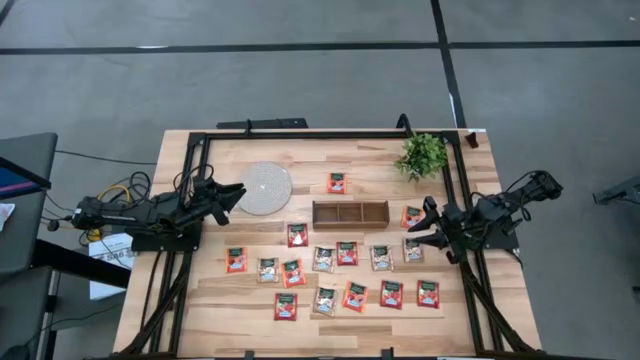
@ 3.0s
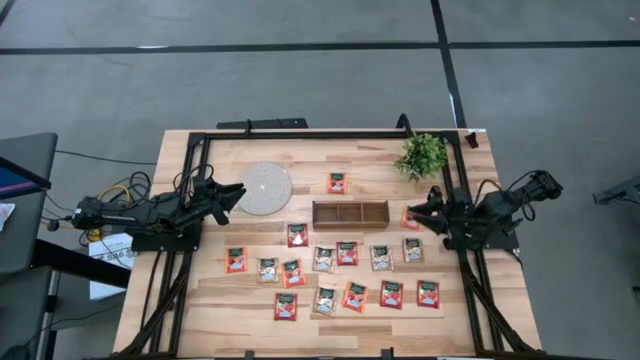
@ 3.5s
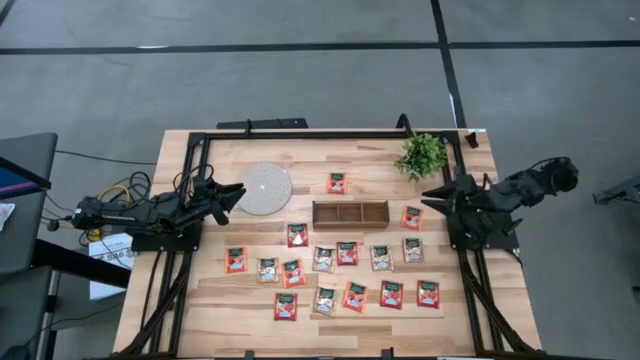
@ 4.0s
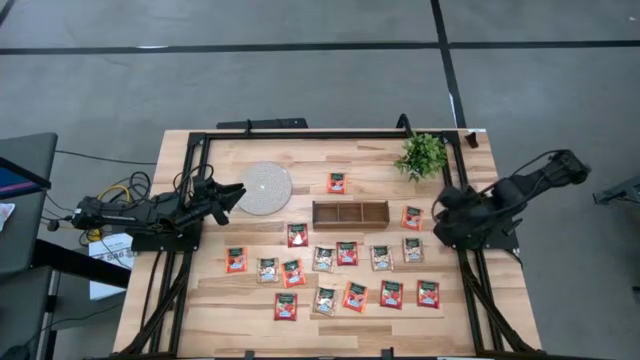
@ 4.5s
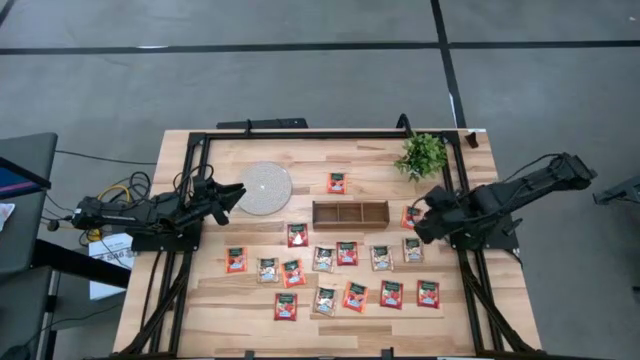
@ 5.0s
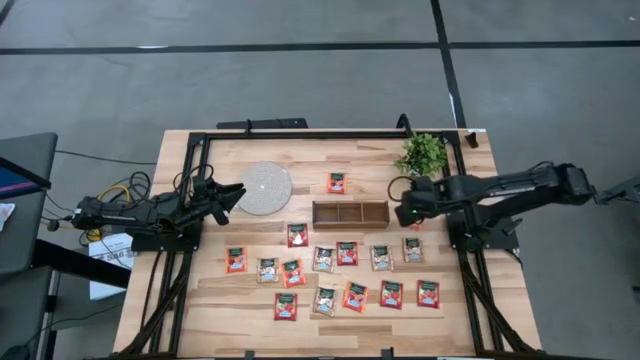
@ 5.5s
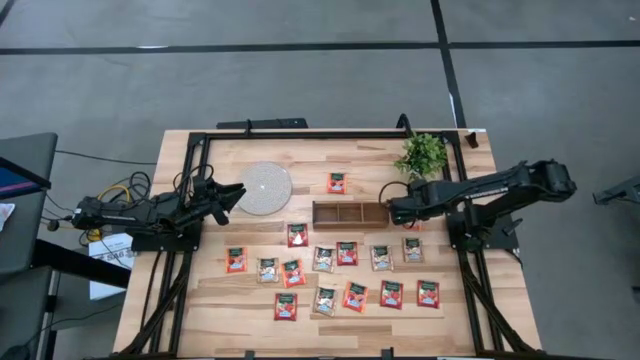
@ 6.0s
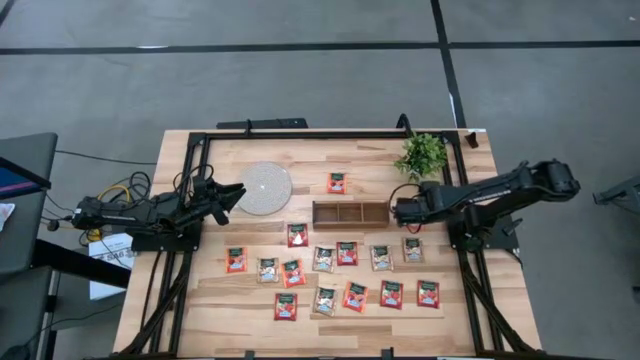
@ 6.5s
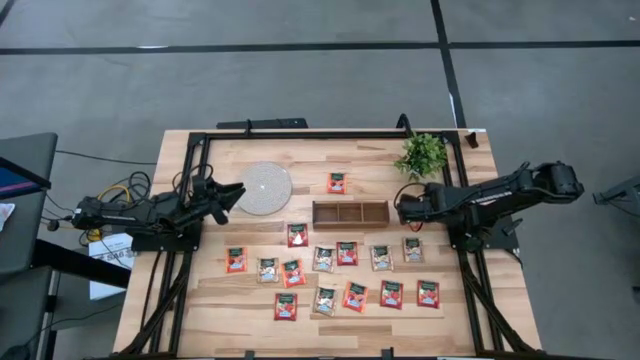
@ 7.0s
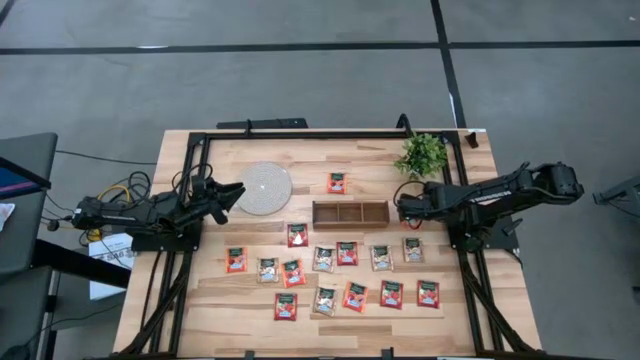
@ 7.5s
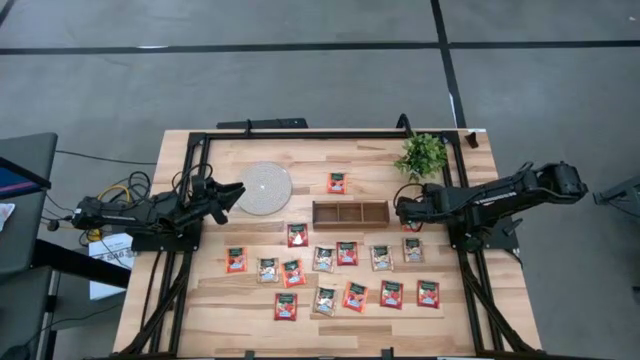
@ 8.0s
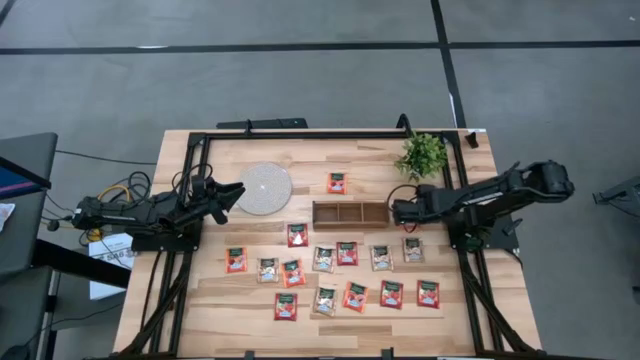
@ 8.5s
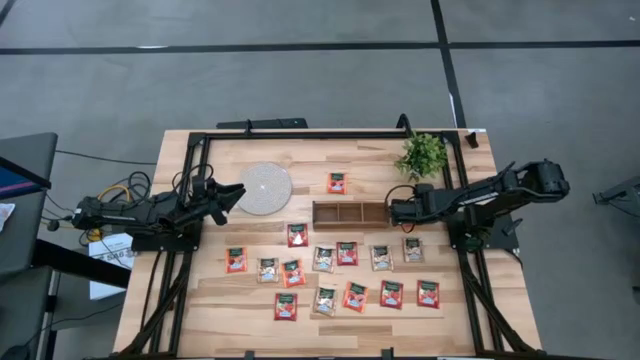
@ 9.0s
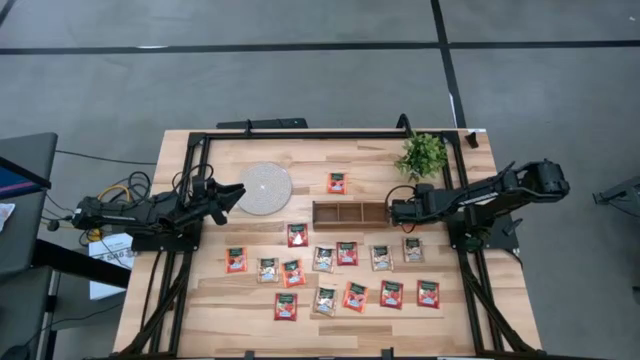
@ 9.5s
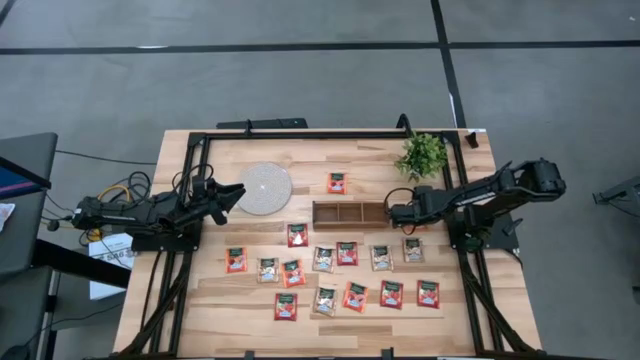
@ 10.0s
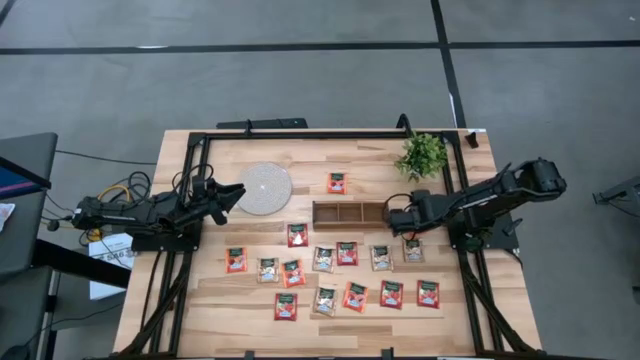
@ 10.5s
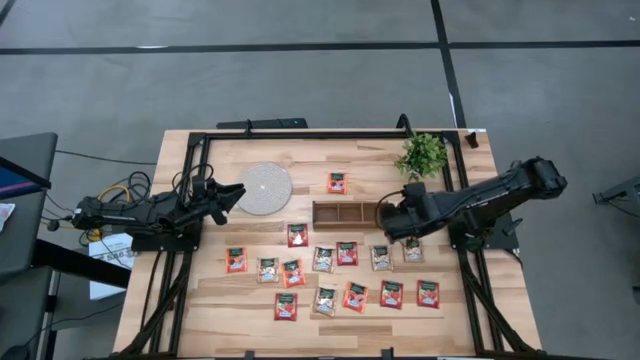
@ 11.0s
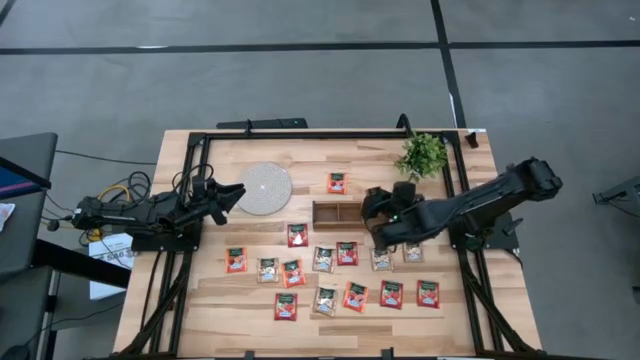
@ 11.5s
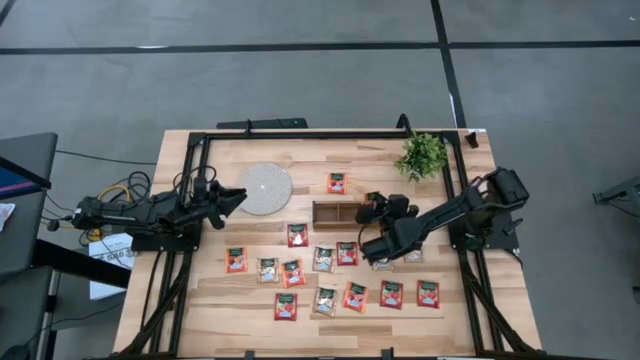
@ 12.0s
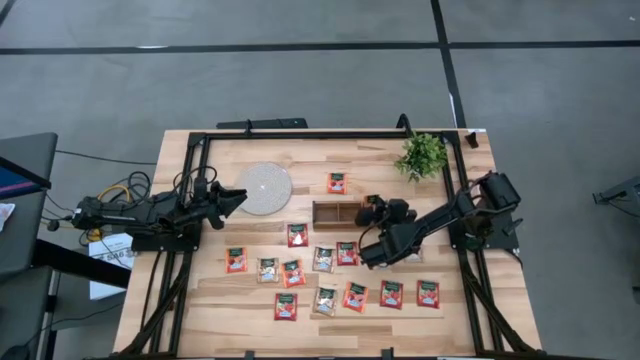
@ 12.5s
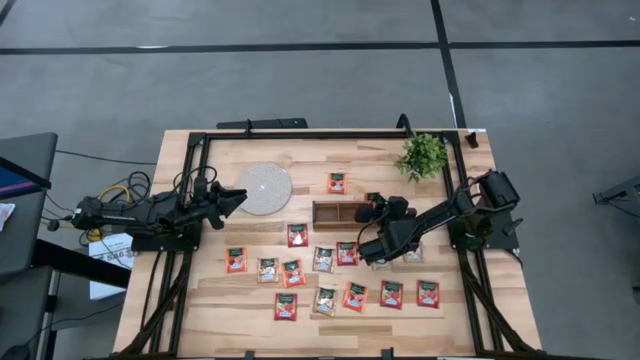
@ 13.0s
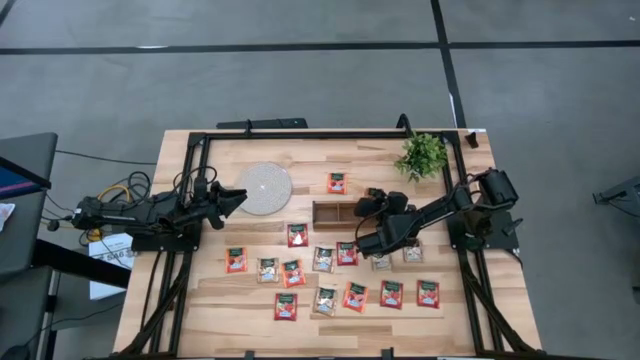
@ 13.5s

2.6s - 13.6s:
Task: Pick & Place Tea
Put the orange tea bag into the right section of the wooden organizer

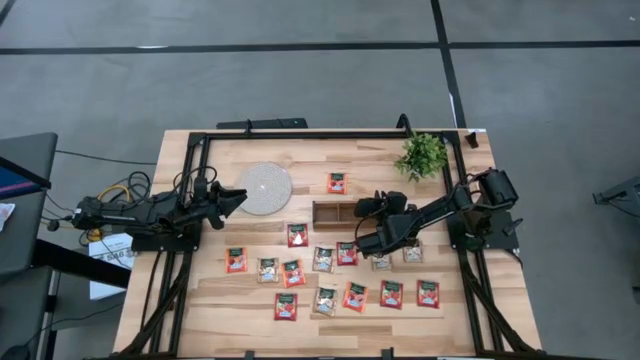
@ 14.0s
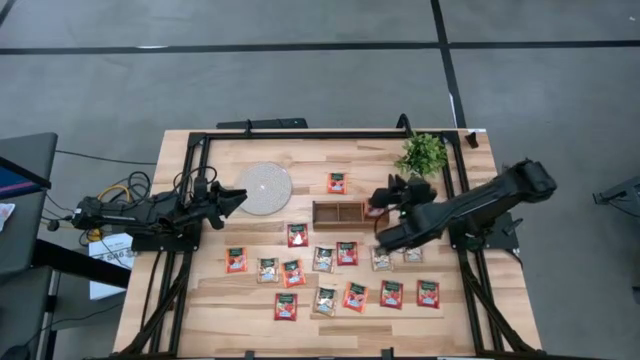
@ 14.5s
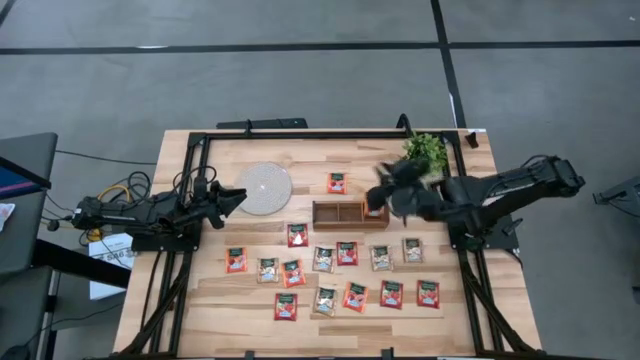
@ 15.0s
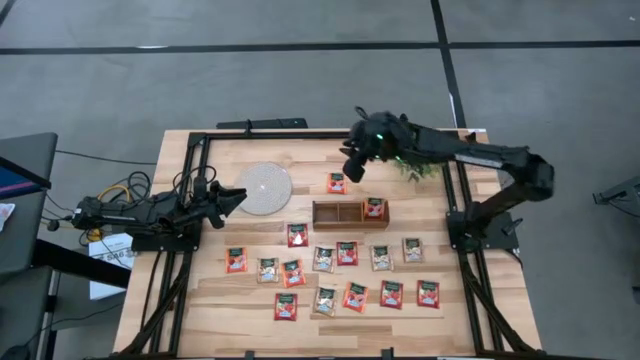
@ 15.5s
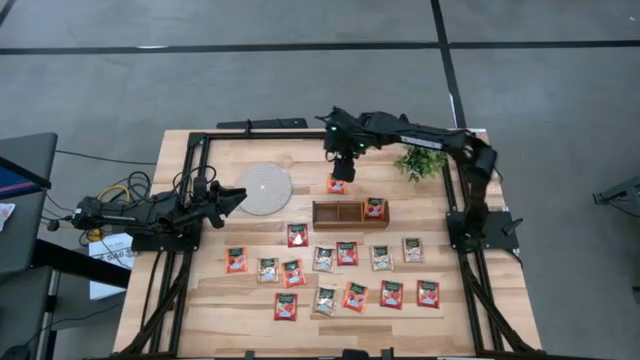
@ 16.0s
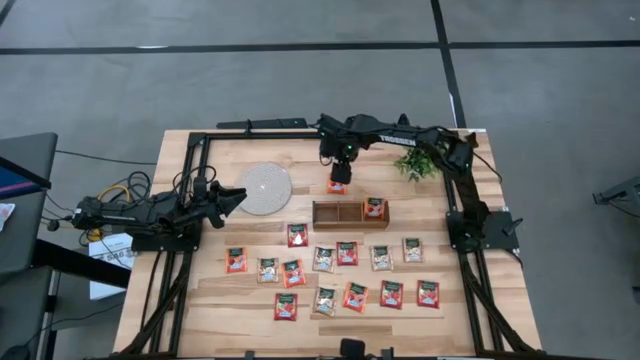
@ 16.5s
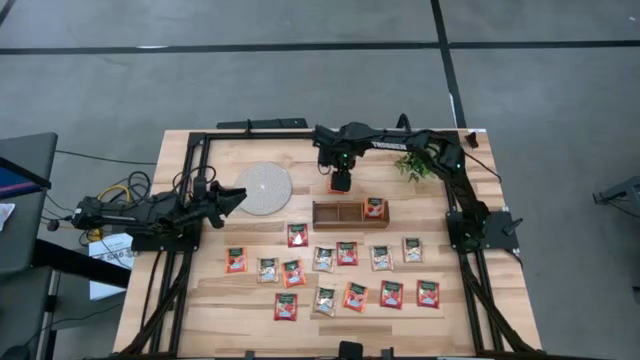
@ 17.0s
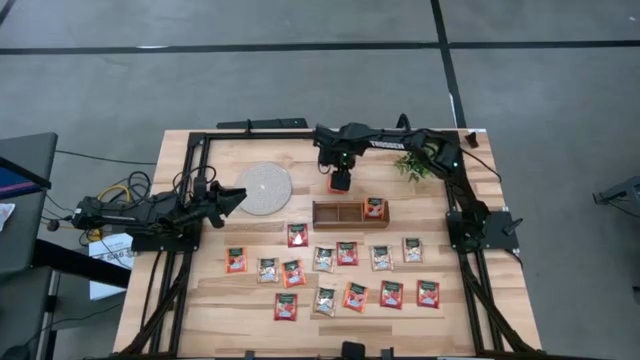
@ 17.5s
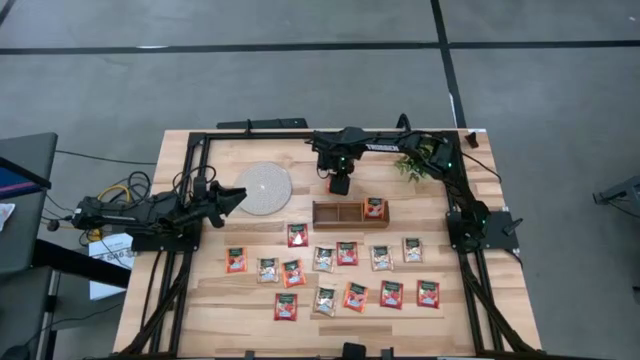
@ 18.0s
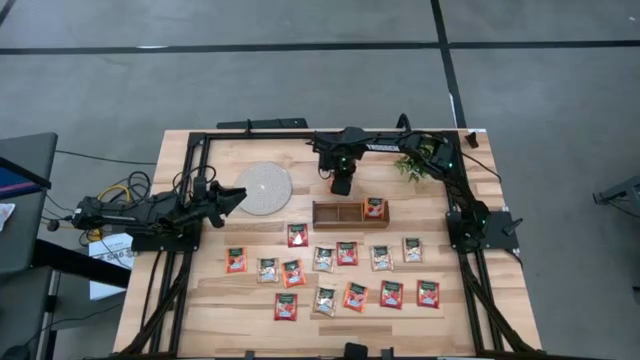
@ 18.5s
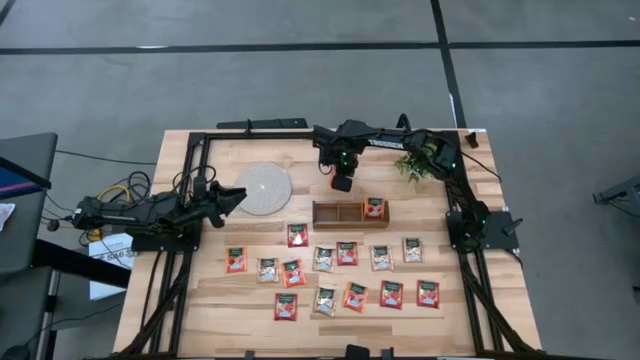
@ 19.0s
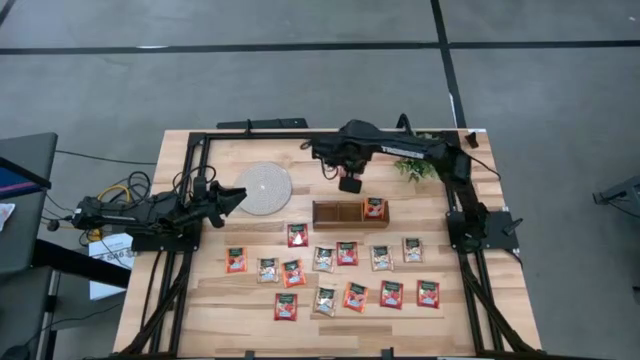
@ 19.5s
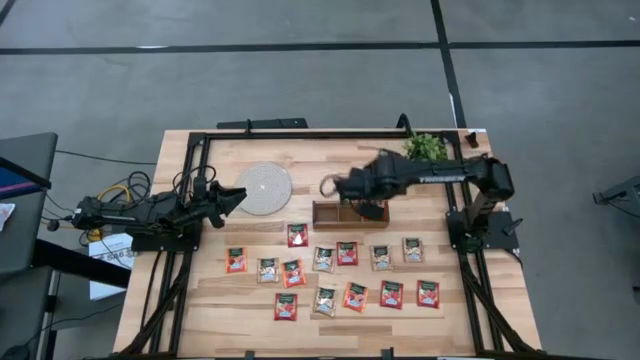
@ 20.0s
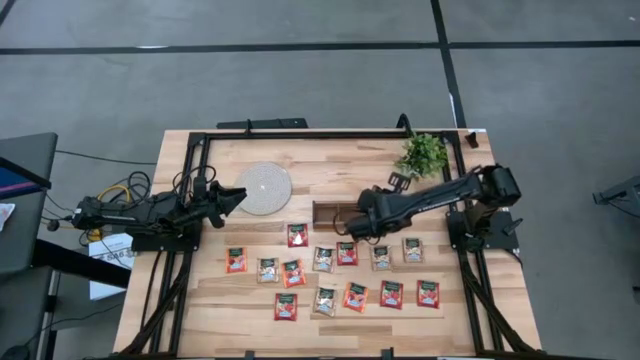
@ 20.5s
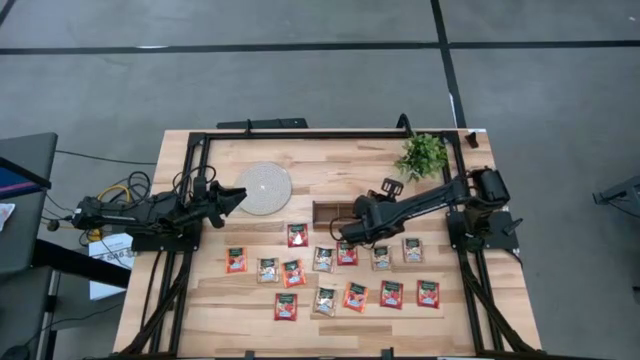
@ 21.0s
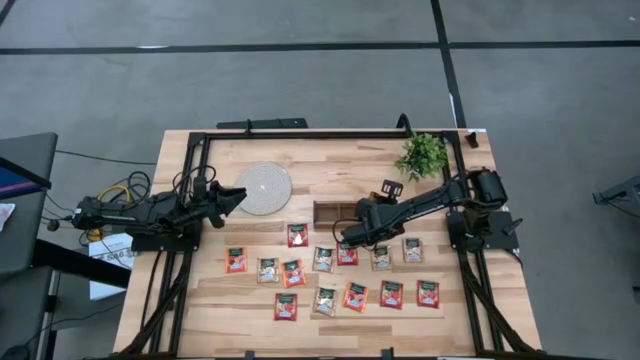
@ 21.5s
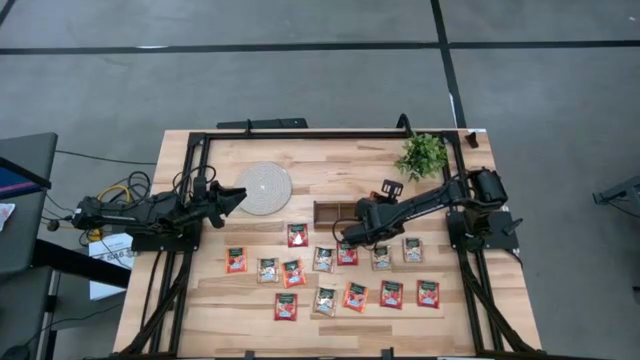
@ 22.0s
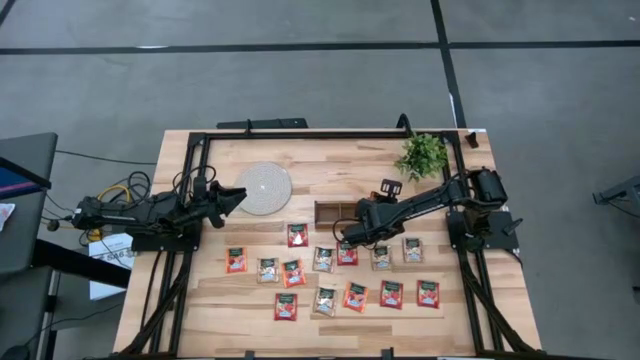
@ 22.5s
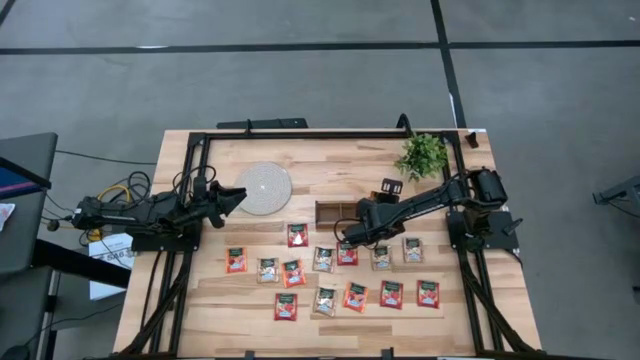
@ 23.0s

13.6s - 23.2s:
Put the orange tea bag into the right section of the wooden organizer
